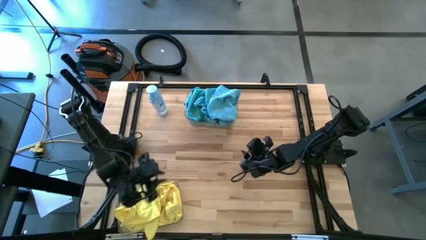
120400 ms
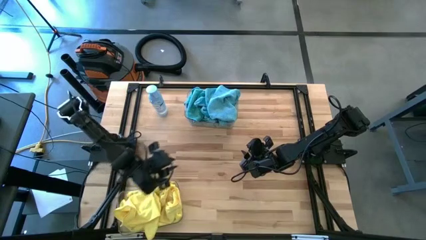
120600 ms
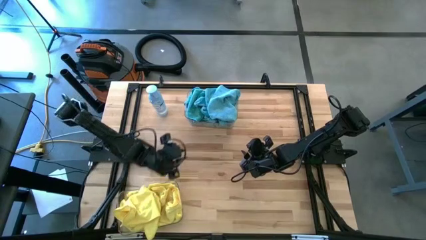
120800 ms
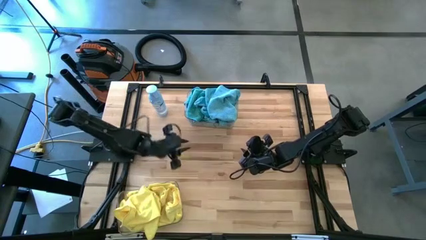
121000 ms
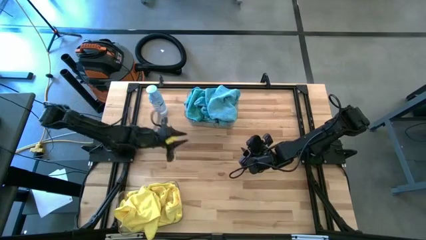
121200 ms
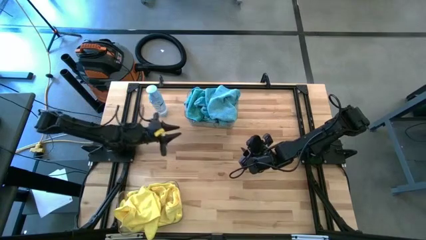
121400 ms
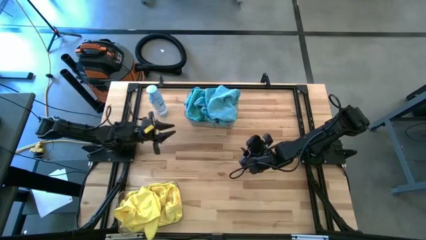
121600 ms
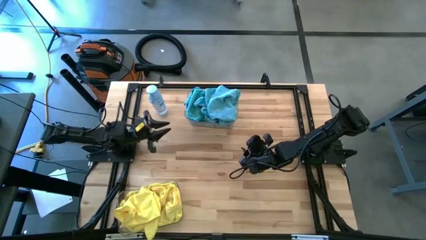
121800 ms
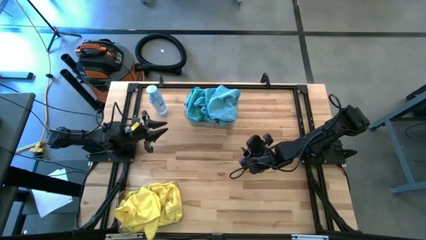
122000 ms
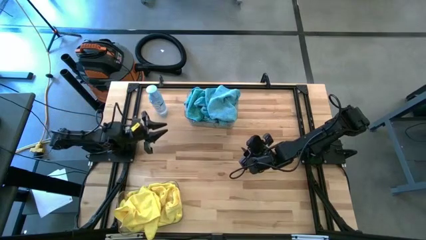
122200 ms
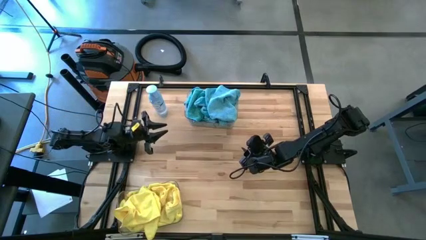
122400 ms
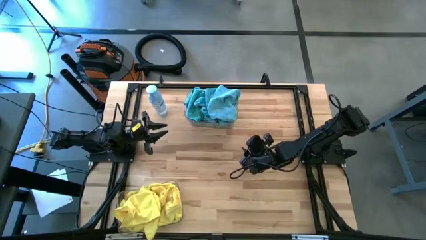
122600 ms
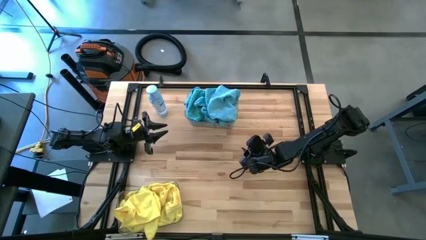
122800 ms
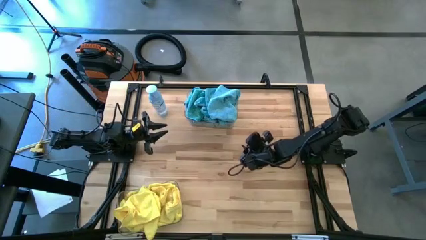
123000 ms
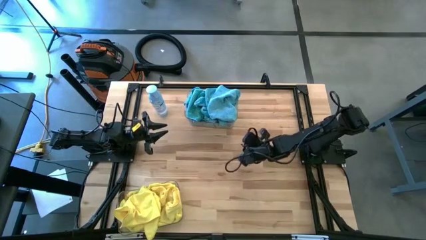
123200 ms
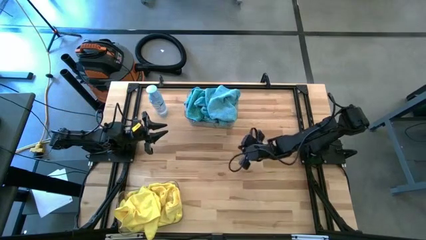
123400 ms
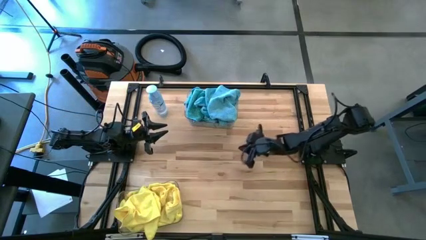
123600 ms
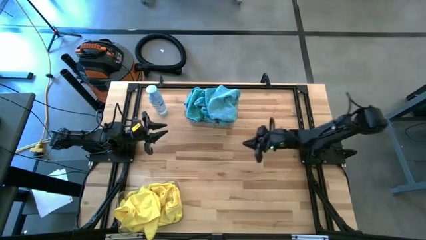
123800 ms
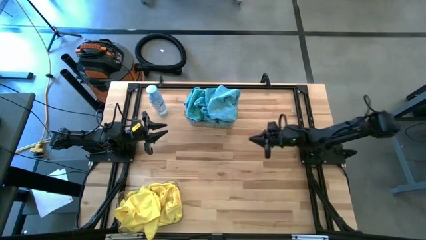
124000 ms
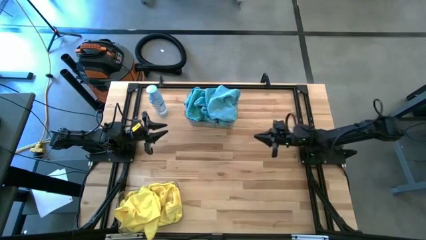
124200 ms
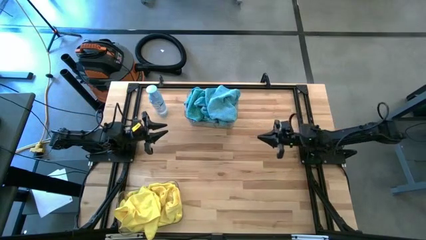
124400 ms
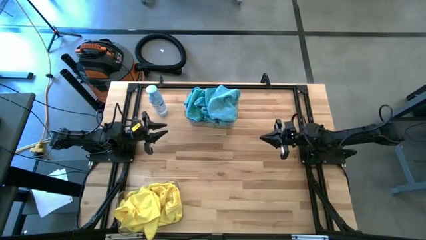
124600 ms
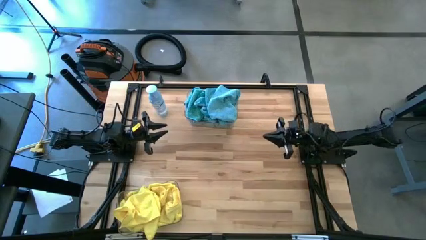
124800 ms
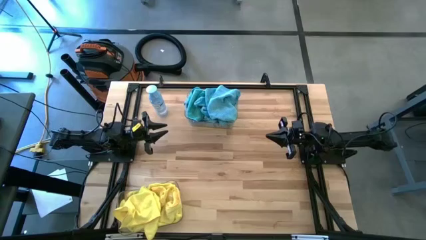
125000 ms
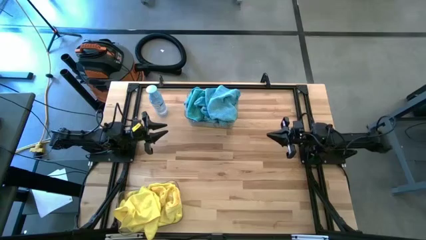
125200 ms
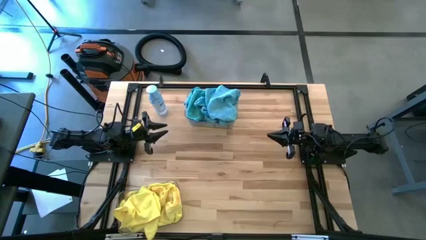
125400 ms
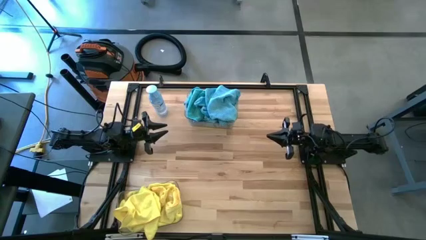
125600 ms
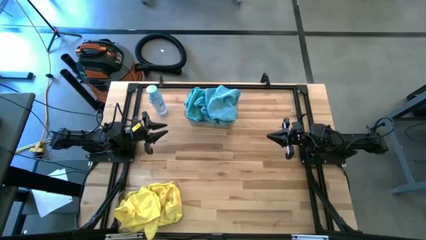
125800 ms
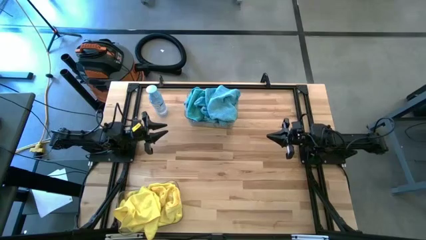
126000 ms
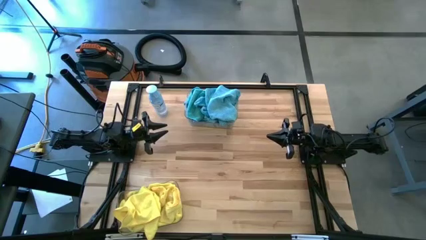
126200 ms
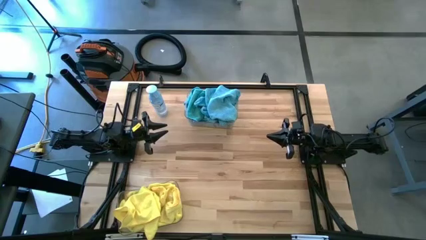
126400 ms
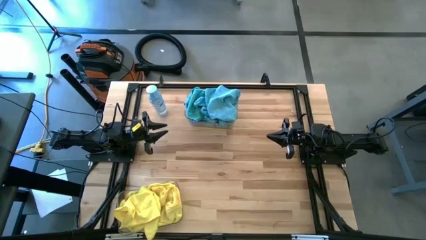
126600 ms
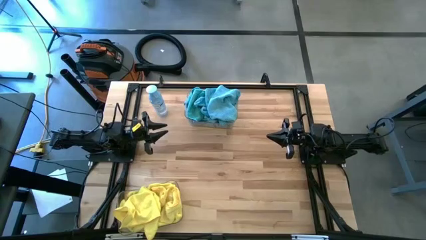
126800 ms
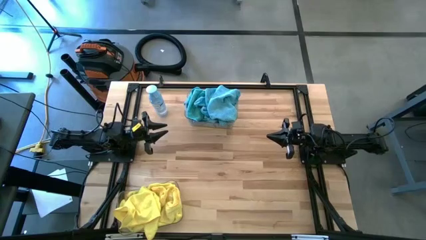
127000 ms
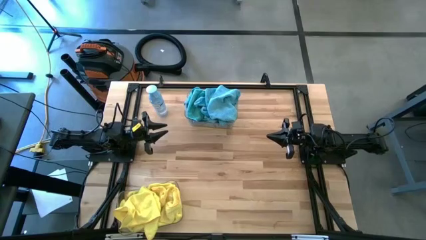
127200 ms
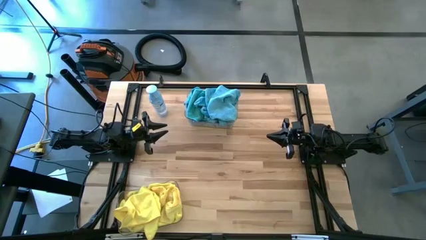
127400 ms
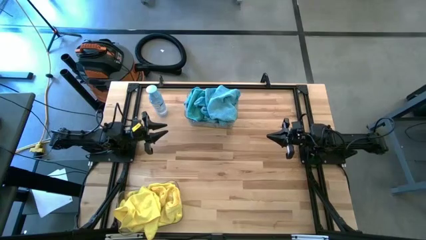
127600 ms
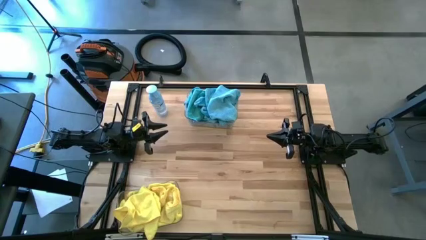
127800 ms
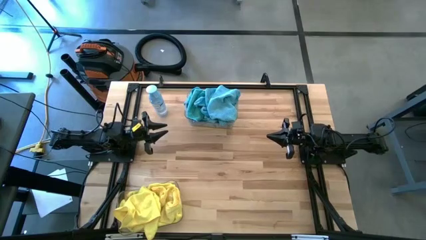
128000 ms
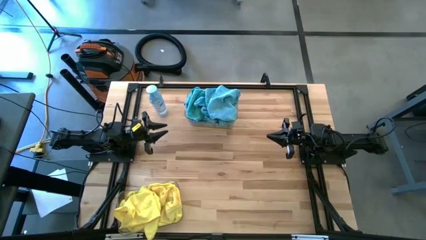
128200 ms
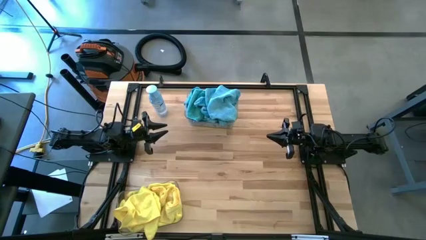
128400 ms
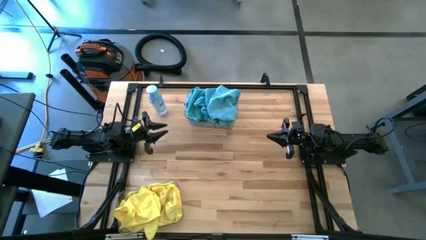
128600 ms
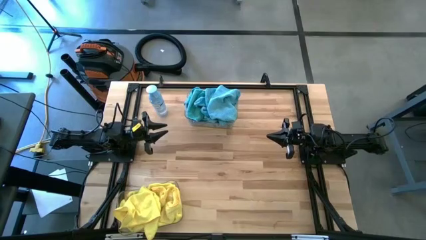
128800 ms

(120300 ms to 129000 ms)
Task: Sort microfiber towel by color & place in baskets
Return to Home Position

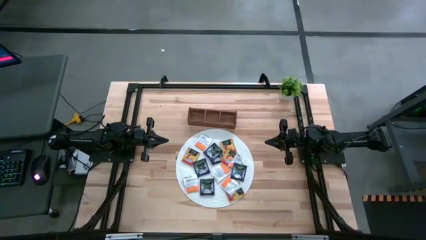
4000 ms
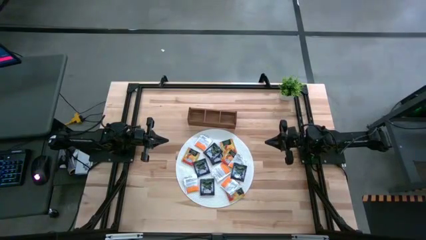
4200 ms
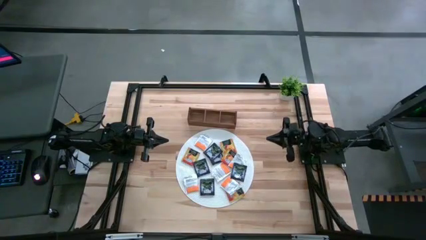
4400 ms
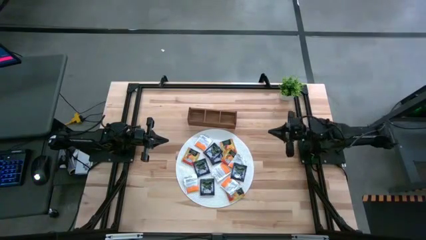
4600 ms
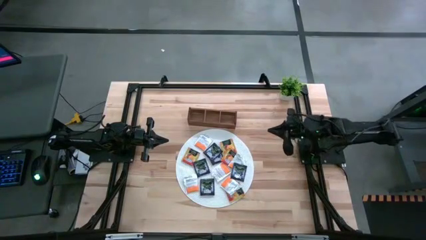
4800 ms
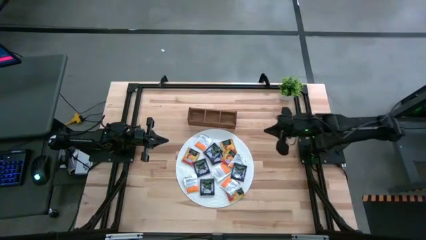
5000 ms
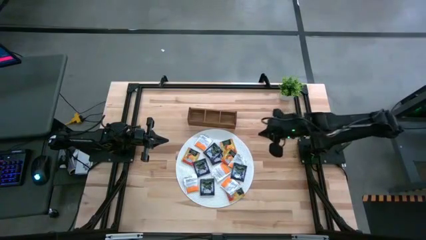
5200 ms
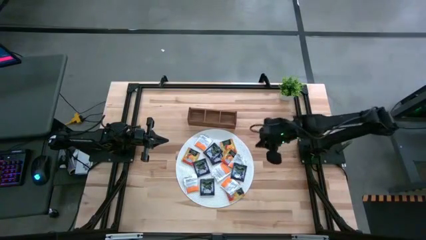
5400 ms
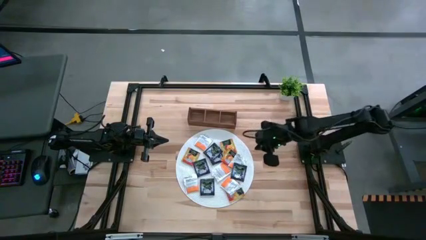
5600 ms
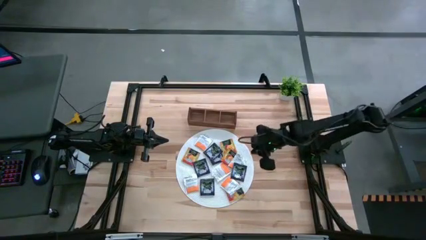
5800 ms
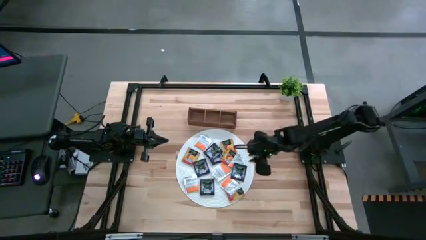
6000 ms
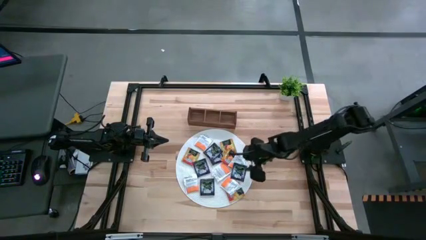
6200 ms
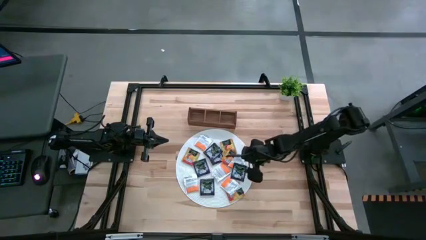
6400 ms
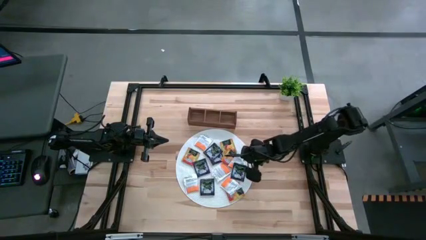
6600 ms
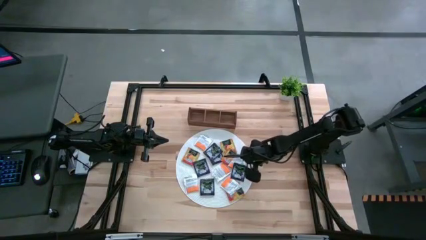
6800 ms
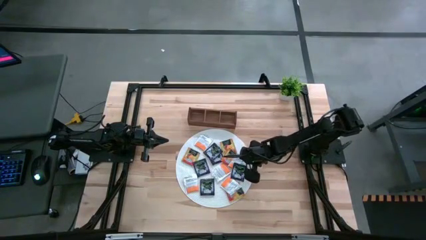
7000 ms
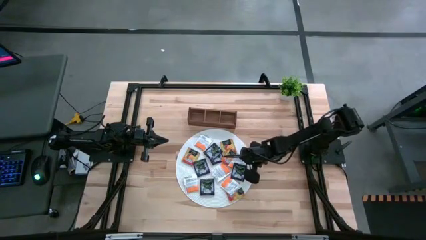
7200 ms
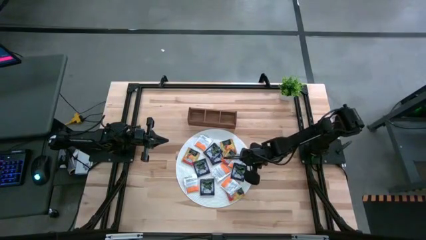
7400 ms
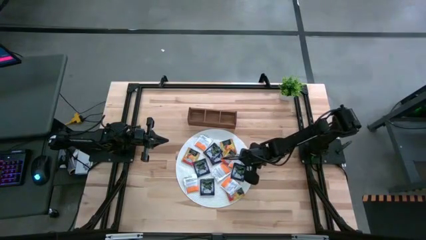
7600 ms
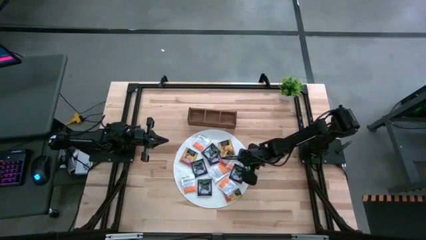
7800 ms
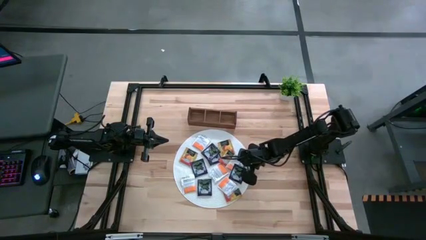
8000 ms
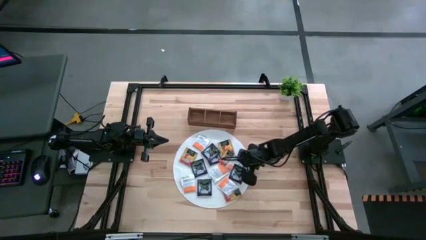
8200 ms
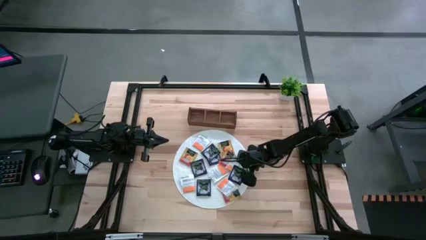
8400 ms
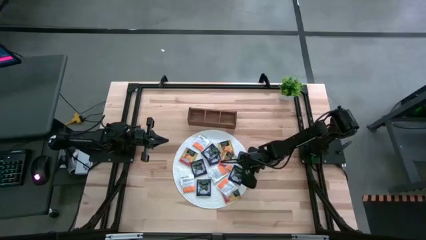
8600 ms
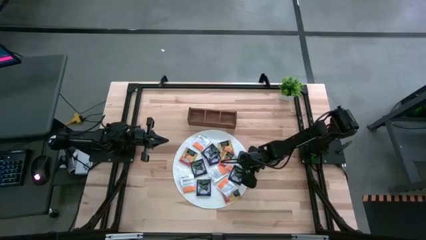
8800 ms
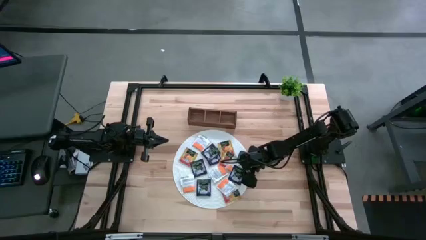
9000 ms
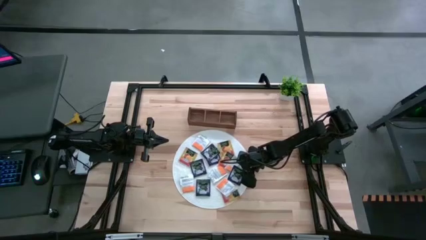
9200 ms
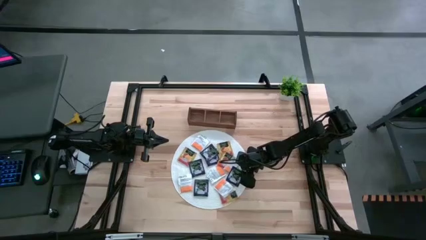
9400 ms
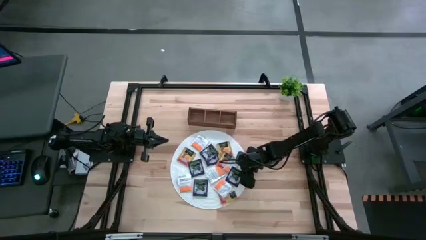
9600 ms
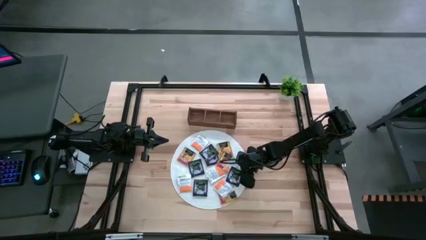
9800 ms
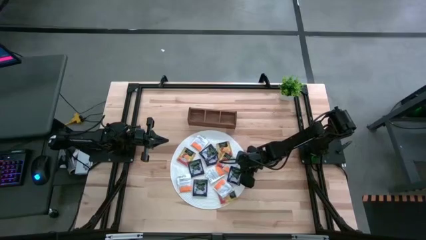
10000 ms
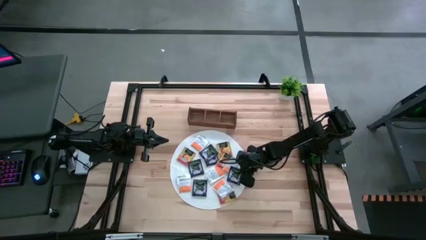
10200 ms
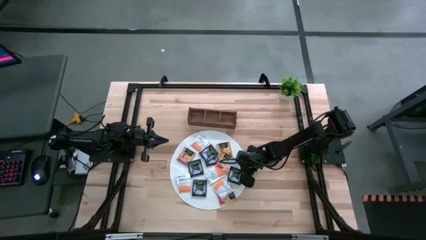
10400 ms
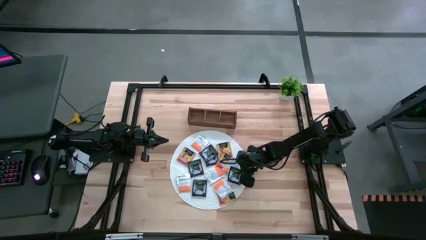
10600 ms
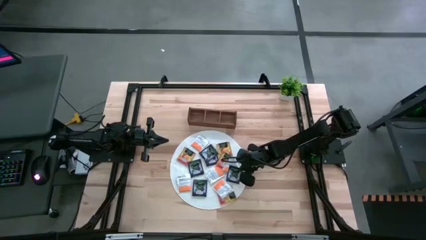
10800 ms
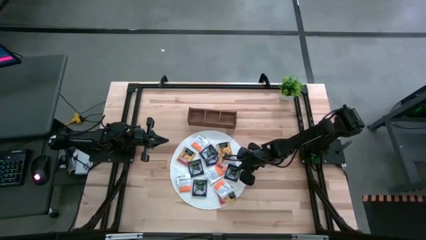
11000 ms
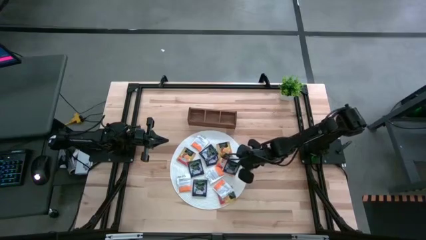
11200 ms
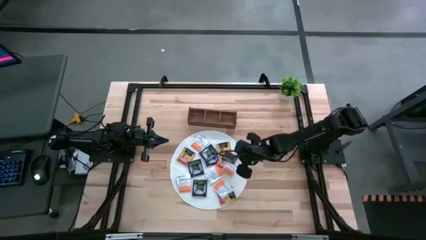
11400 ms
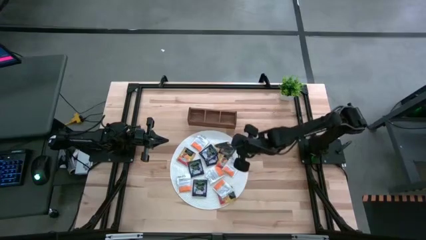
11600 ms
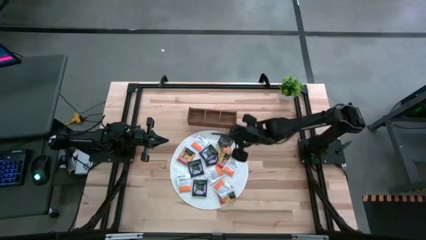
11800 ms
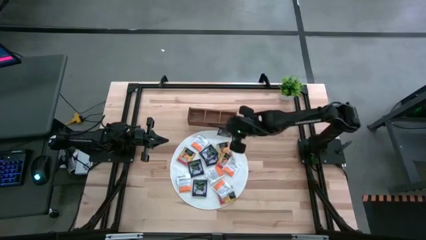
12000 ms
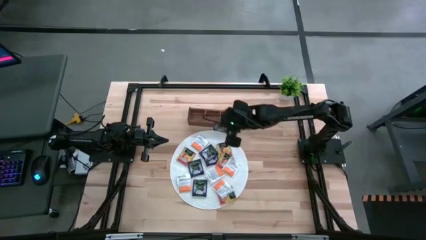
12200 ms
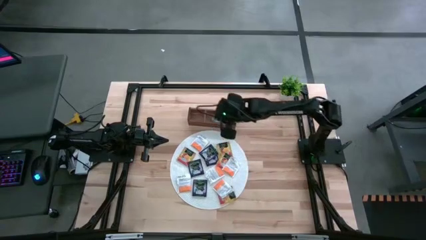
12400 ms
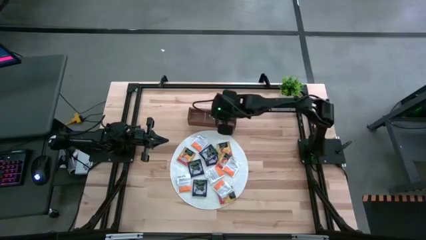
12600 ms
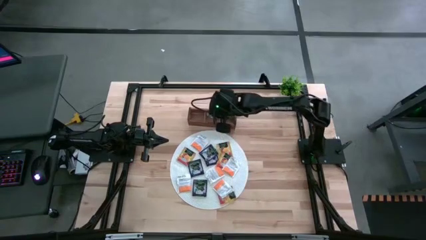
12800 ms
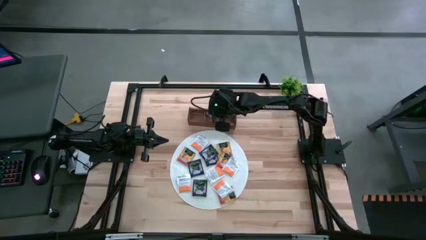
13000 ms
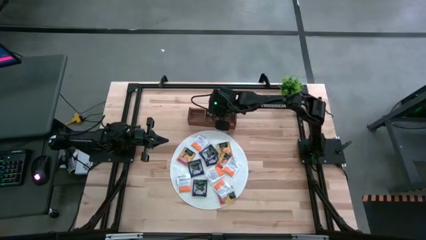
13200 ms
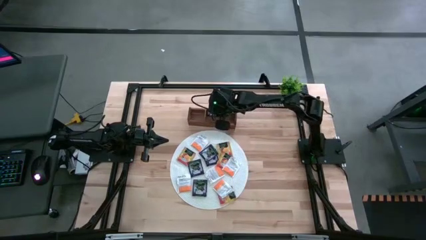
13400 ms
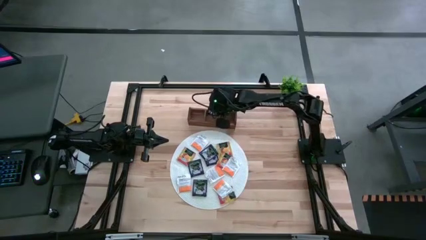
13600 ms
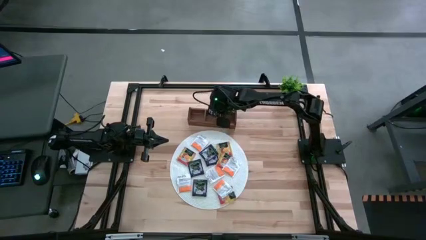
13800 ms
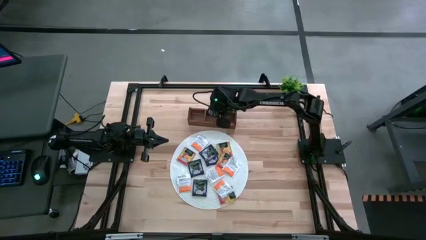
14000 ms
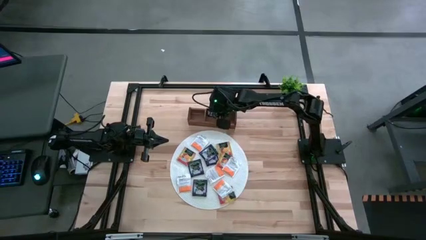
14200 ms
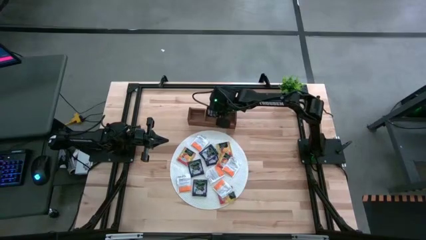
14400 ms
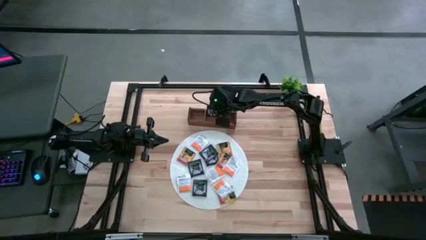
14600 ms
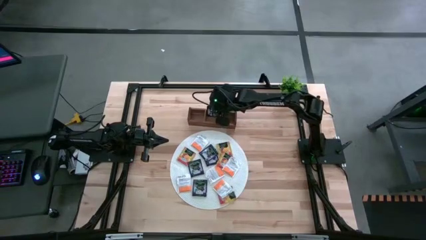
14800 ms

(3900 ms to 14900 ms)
Task: Pick & Place Tea
Put the black tea bag into the middle section of the wooden organizer
